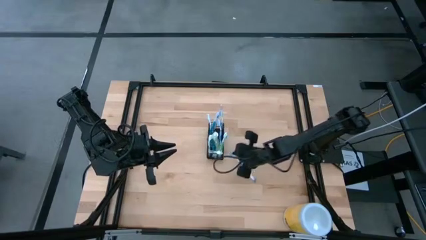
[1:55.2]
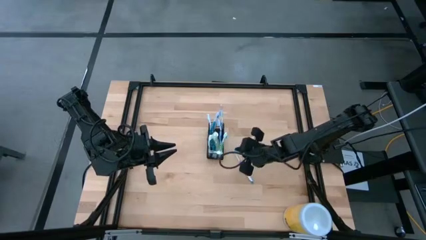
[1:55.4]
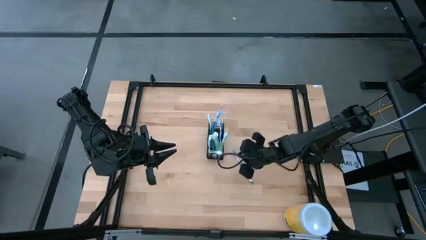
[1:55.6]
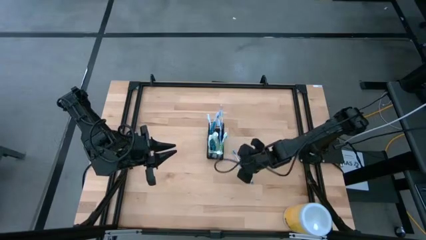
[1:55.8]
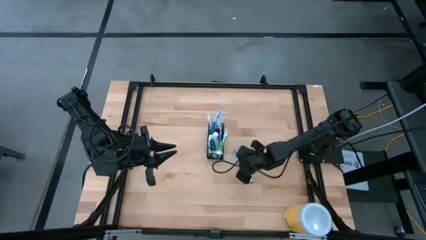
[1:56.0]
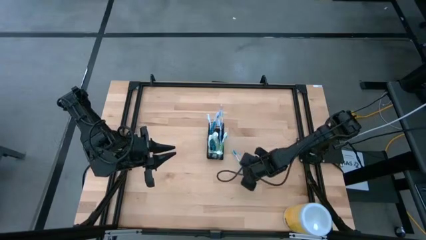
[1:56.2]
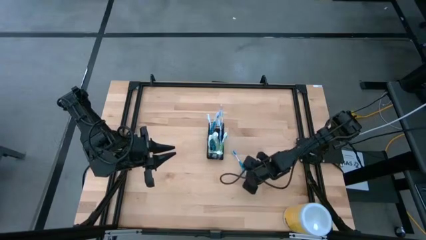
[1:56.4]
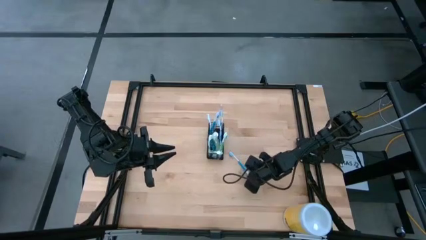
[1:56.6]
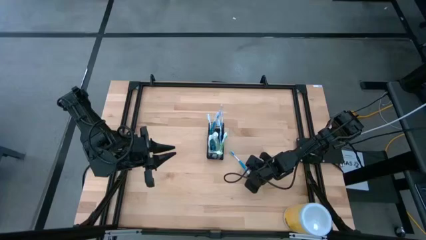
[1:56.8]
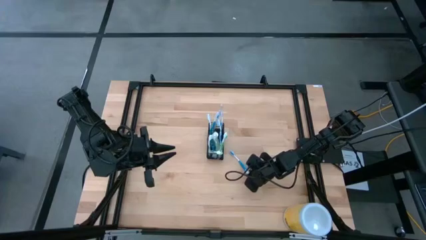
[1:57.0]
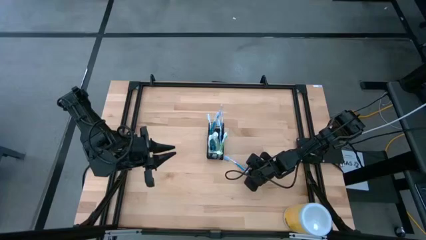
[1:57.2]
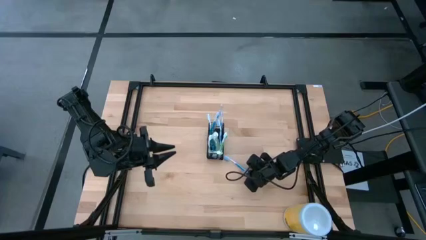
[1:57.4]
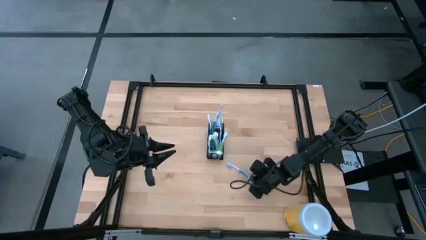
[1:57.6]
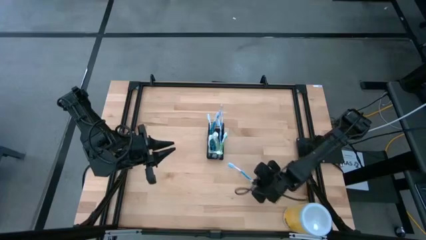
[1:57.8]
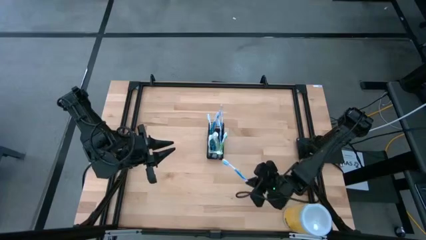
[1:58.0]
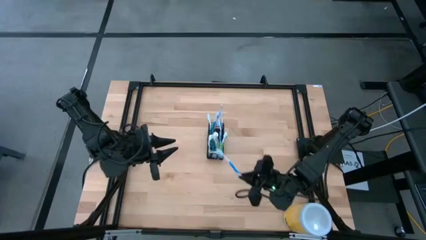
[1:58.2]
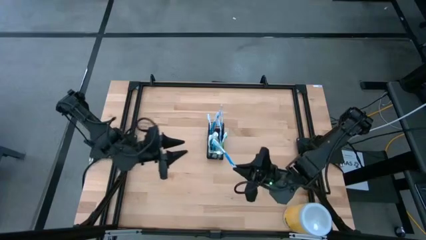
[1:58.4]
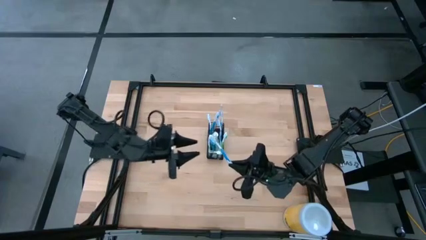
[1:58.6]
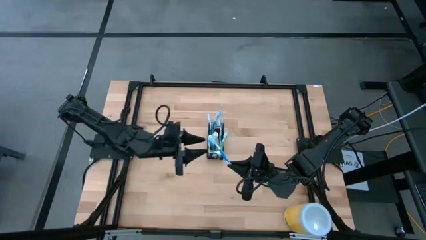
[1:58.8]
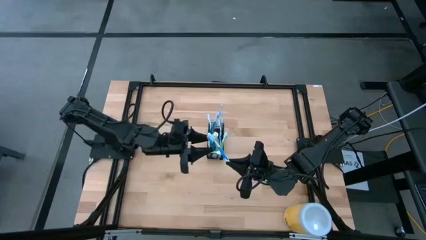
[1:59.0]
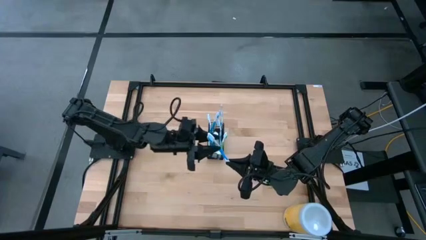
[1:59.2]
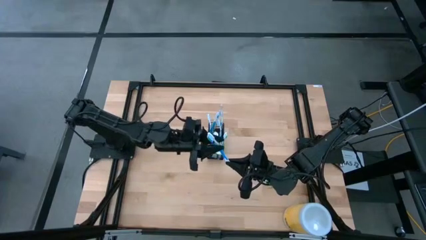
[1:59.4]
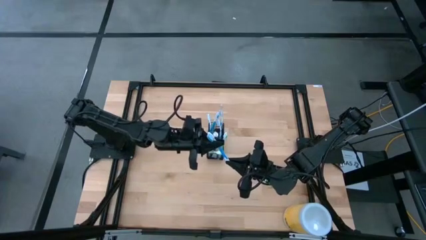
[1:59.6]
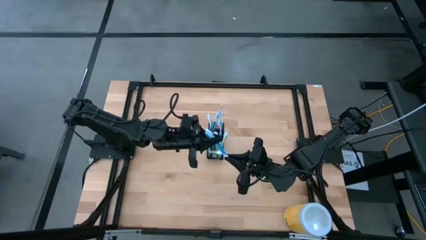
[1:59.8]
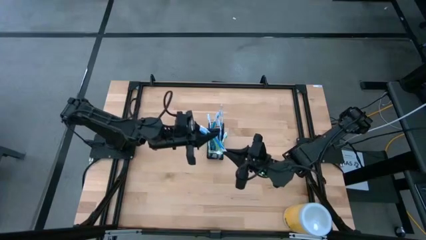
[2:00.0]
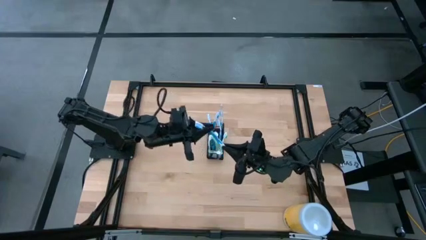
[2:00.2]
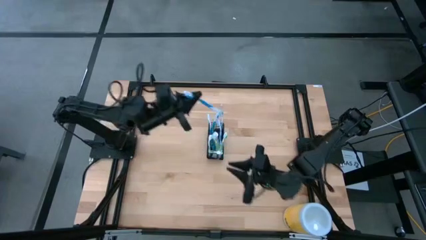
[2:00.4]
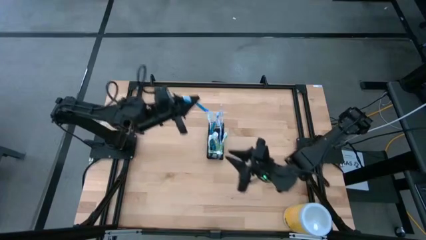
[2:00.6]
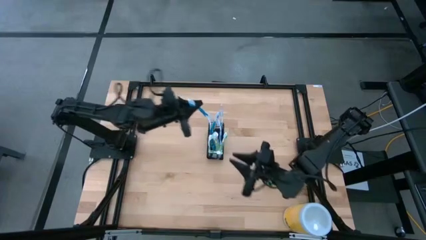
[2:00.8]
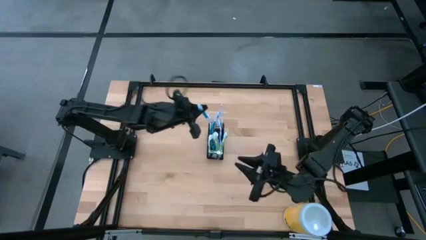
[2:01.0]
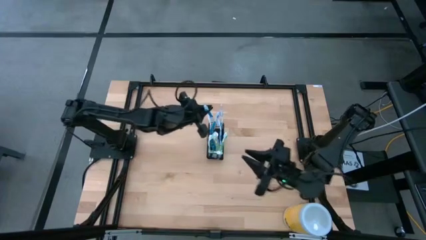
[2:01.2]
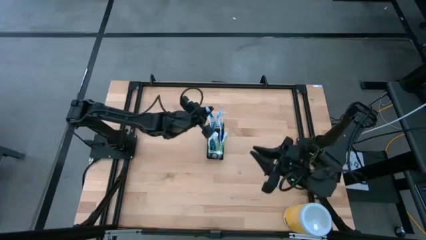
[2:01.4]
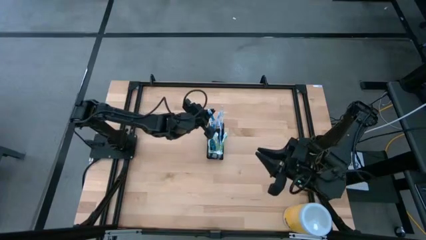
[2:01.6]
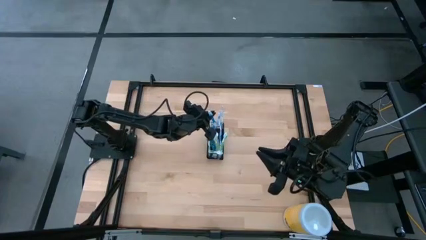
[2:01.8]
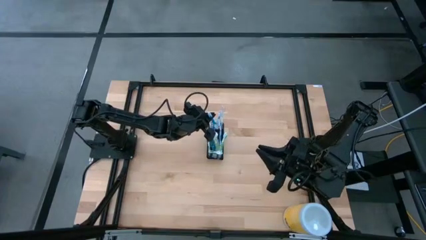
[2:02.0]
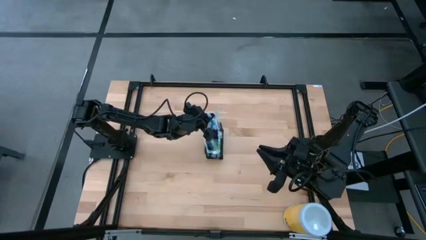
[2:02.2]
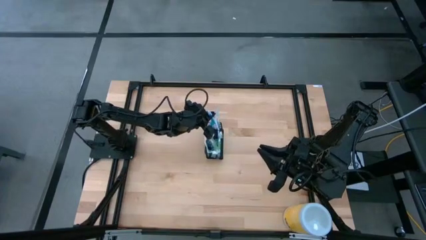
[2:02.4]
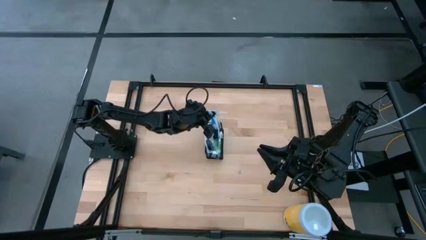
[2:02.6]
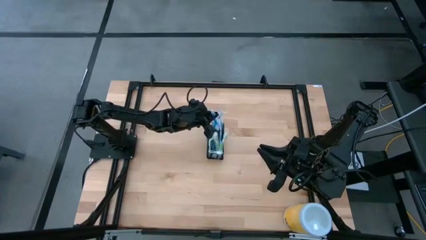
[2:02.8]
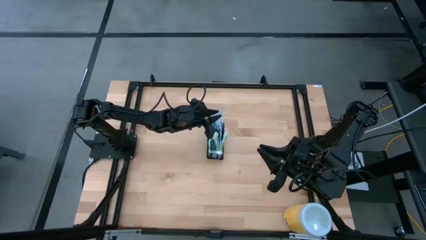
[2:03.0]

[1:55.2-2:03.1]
Task: Pick & Place toothbrushing station
Put the blue toothbrush into the black organizer

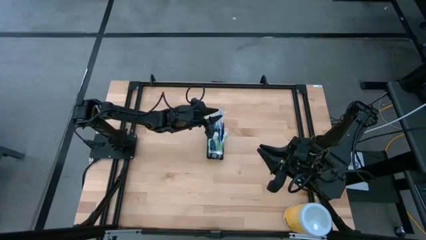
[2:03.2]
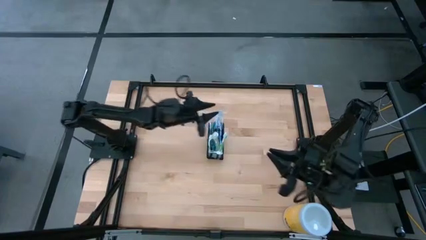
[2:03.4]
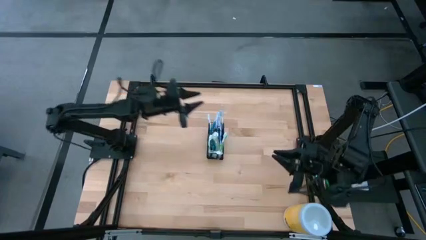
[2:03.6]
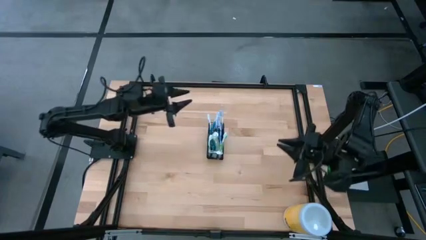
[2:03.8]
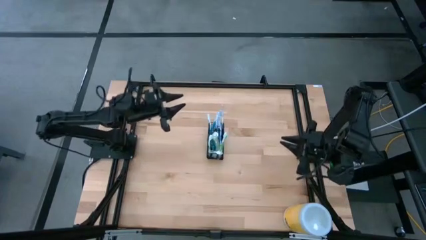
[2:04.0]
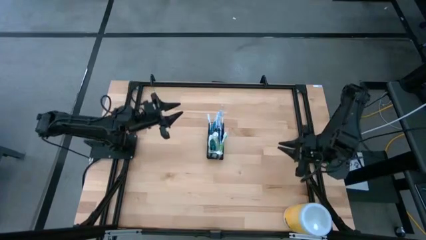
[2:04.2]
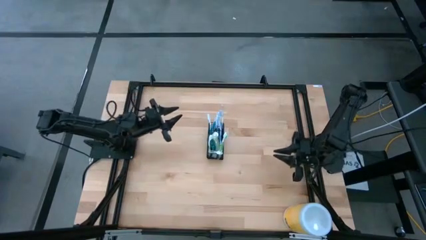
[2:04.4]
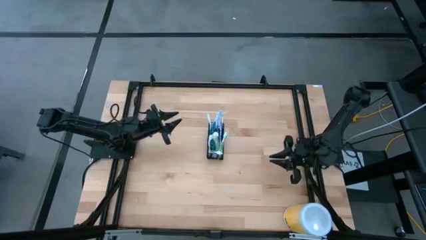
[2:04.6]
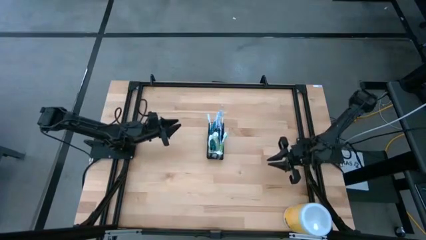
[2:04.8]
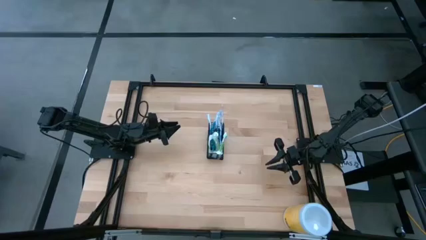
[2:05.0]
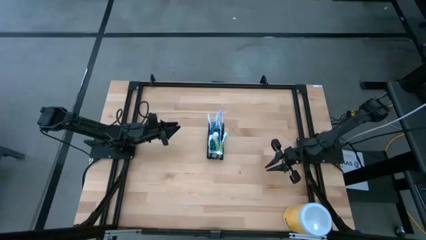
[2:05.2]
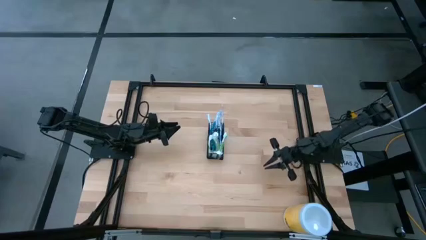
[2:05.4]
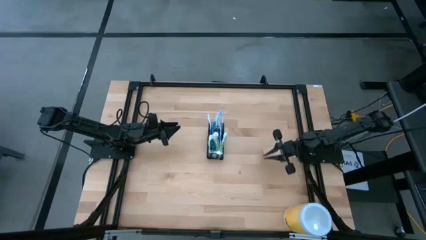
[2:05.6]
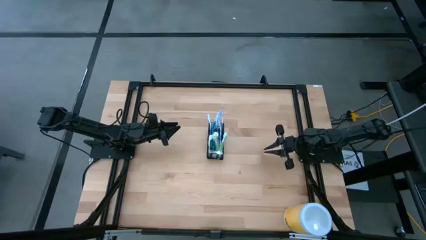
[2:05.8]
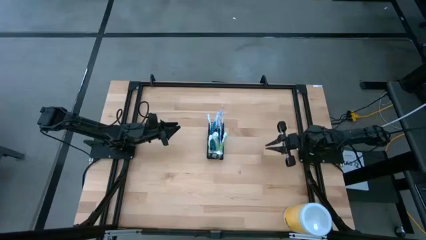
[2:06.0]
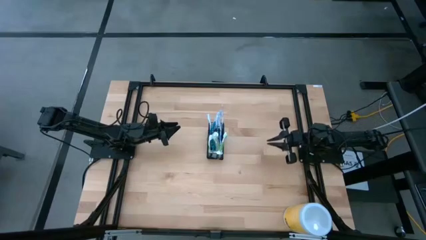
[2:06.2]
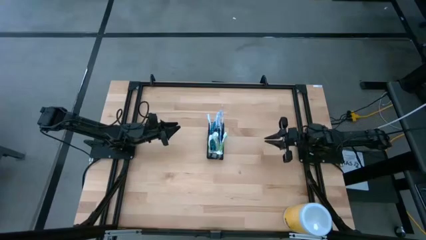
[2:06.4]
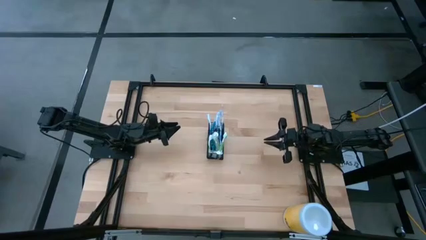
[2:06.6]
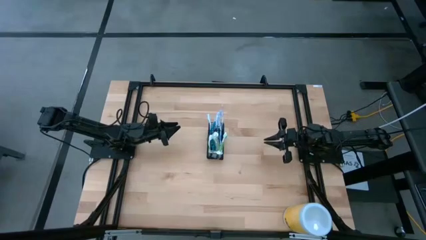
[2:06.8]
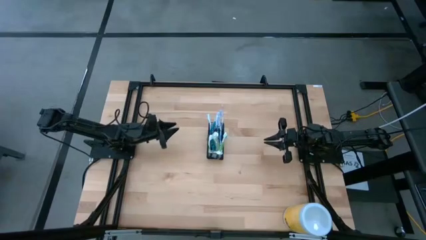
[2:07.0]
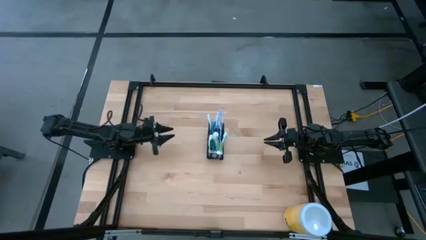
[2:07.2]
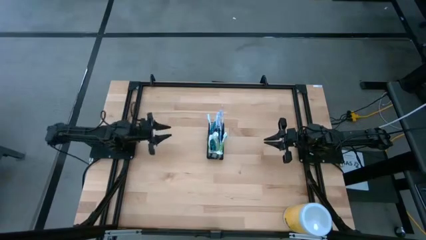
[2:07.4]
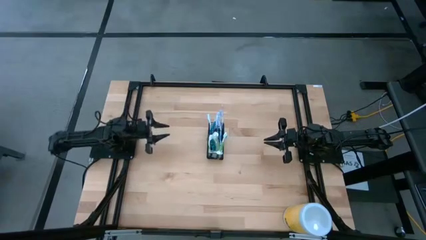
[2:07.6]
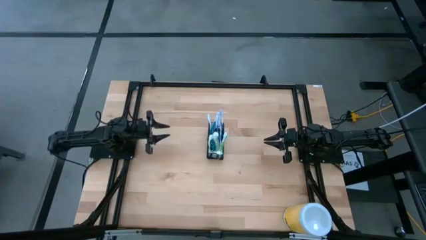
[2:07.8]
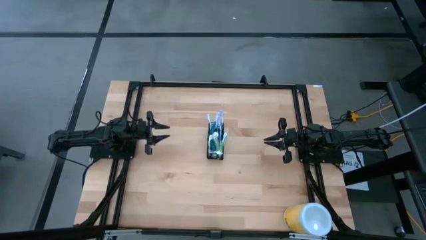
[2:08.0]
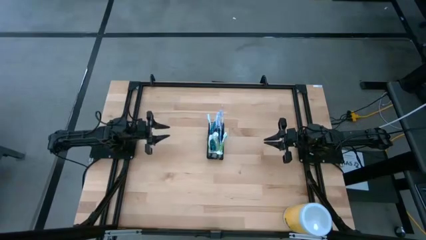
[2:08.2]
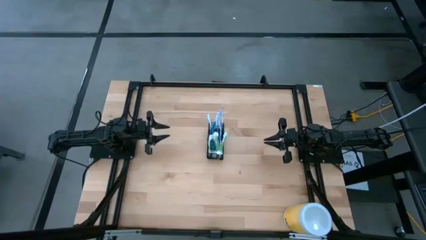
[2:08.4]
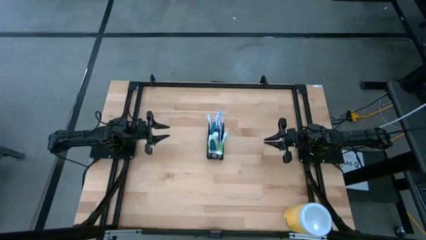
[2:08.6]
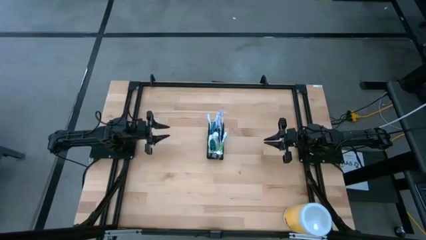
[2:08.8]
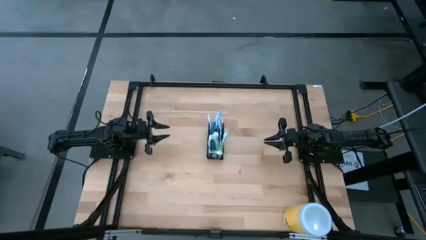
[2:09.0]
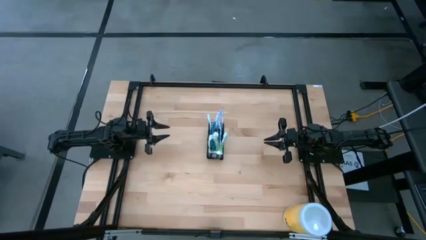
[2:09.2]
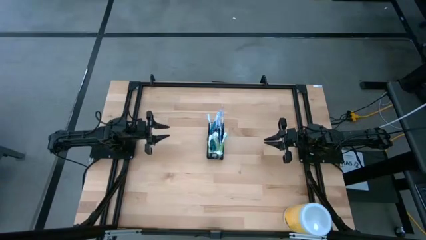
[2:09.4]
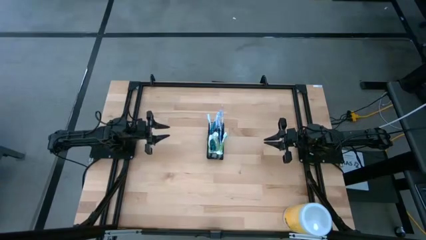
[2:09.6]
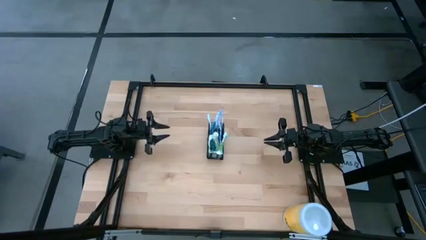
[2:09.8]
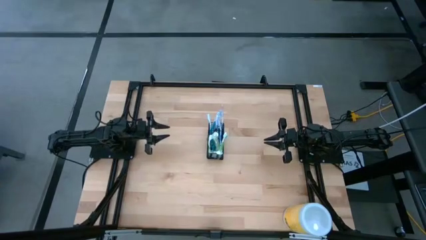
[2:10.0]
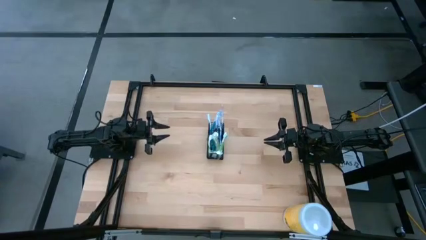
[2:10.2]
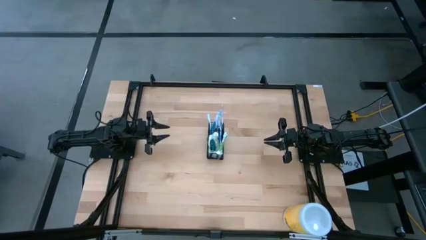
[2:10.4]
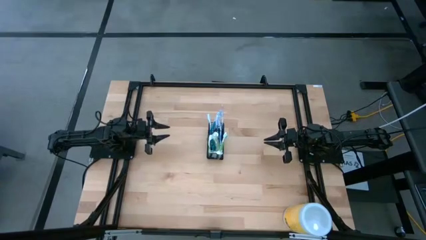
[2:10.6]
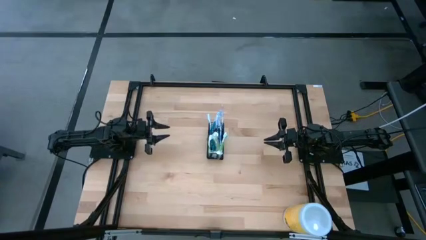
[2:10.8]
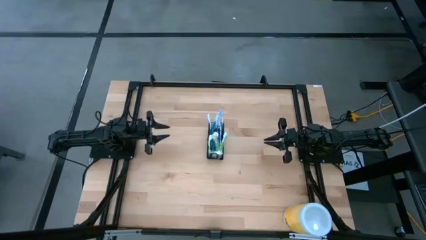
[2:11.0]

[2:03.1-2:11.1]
Return to Home Position

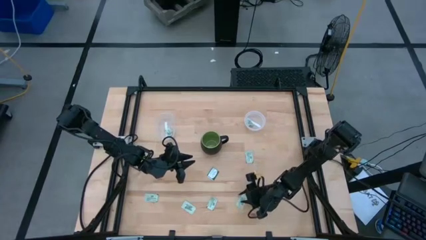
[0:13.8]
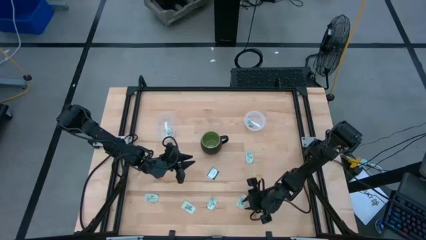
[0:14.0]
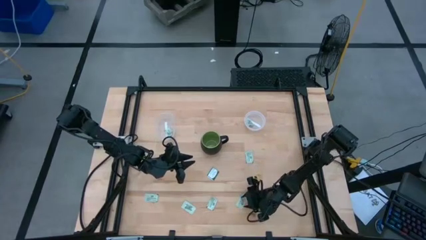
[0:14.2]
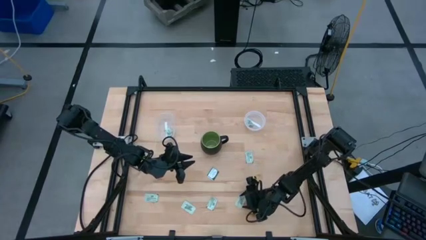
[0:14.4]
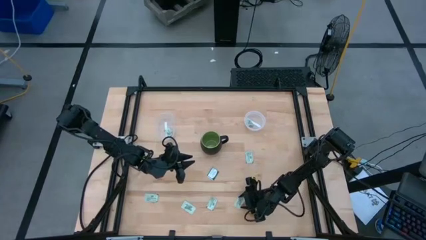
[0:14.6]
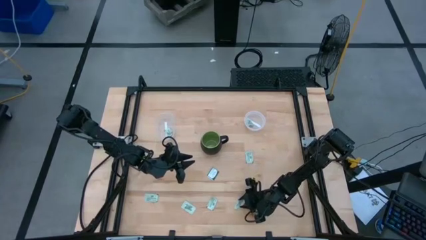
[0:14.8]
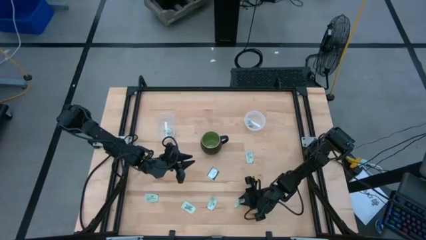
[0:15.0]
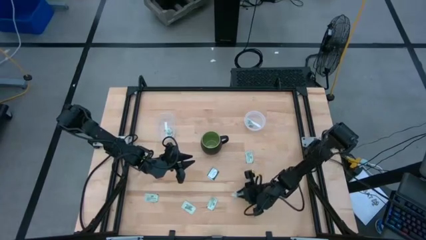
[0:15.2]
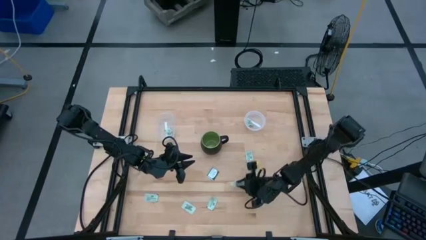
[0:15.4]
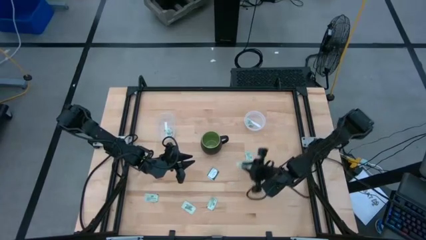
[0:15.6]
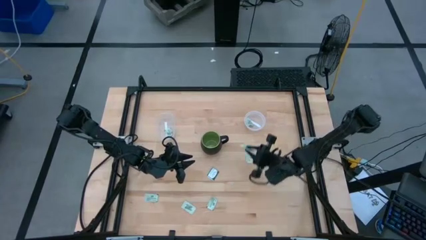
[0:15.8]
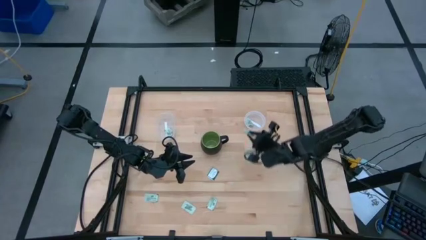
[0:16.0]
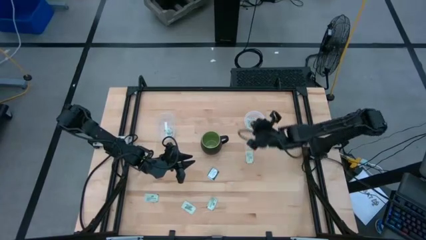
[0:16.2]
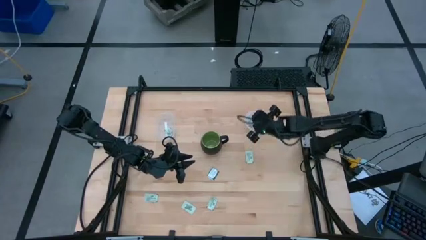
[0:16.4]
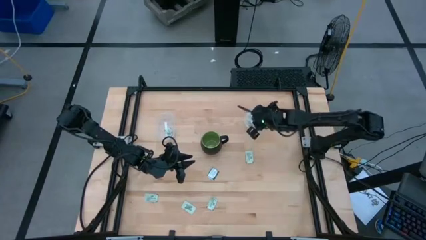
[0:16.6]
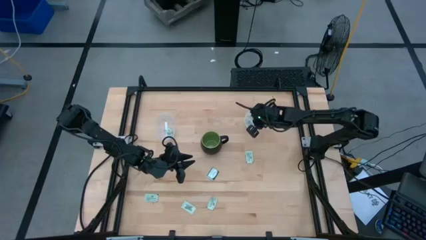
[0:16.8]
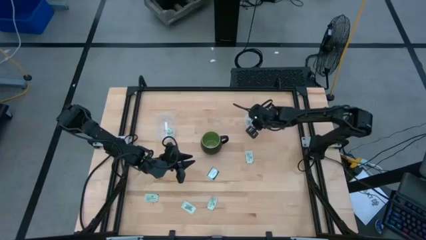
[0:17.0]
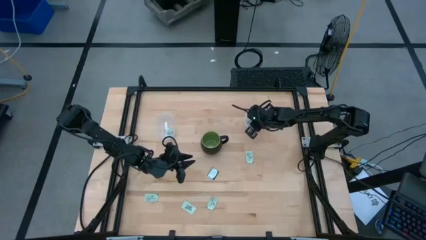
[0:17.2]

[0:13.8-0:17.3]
Task: Pick and place items into bin
Put the green stevia packet into the right transparent bin
